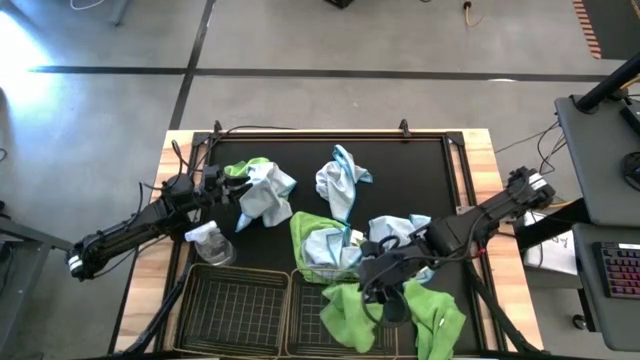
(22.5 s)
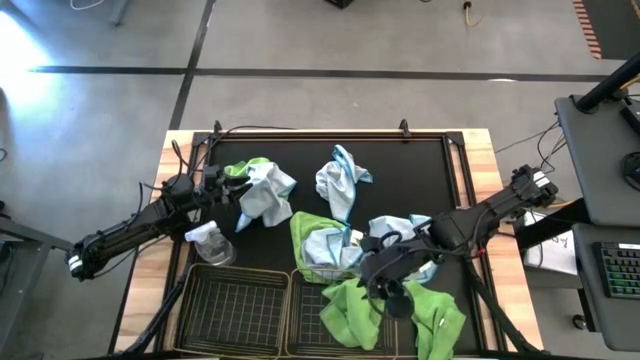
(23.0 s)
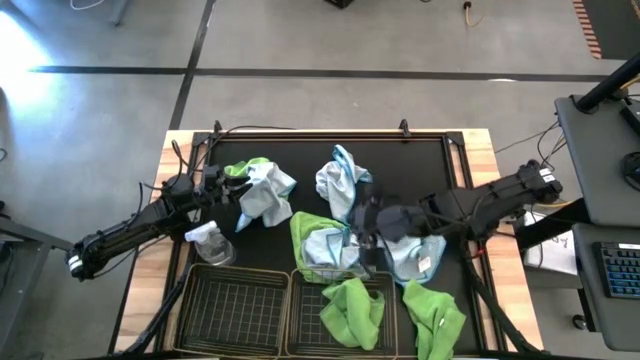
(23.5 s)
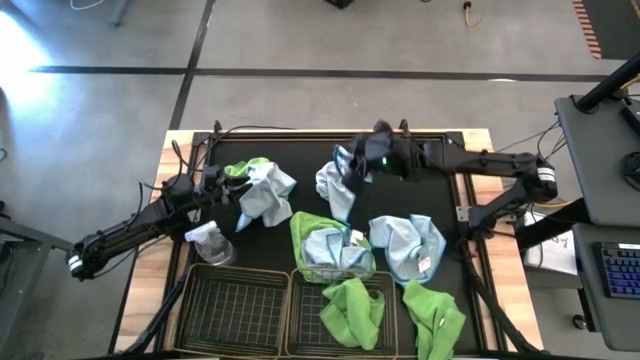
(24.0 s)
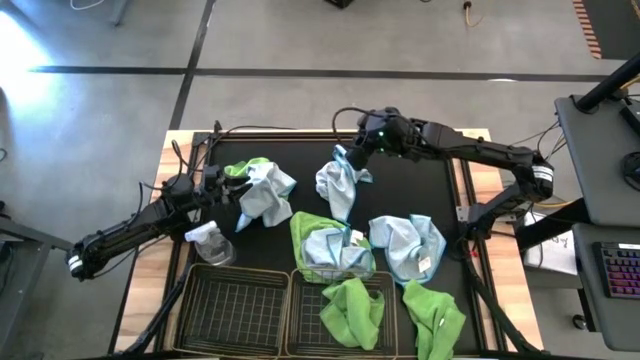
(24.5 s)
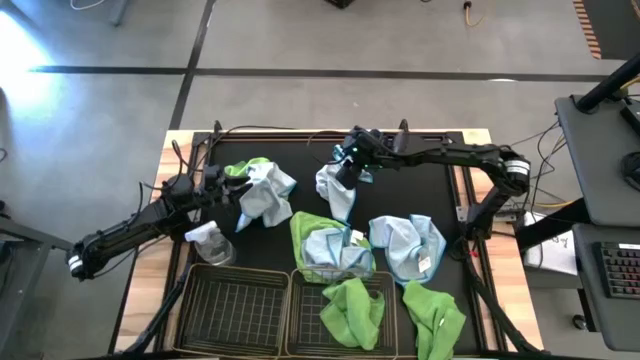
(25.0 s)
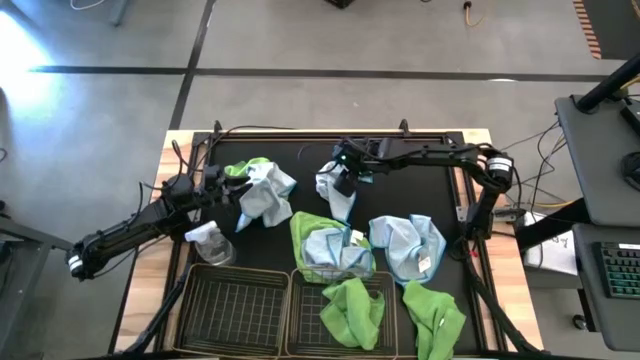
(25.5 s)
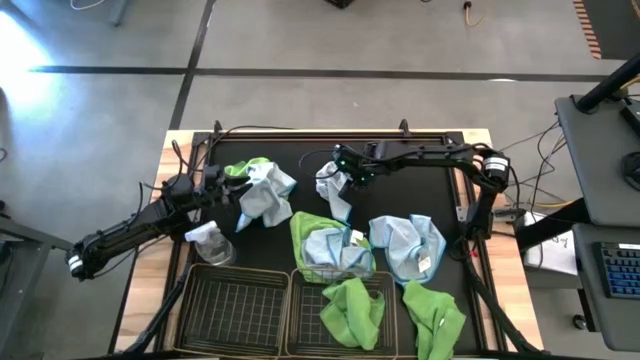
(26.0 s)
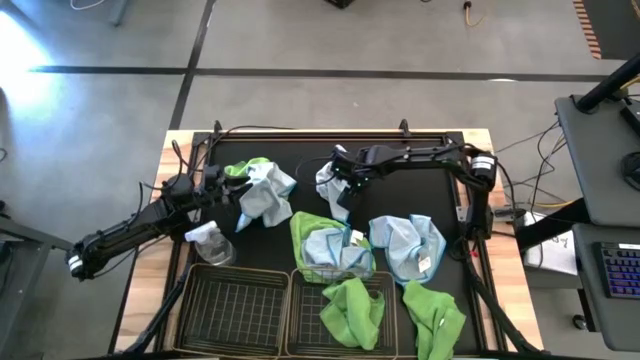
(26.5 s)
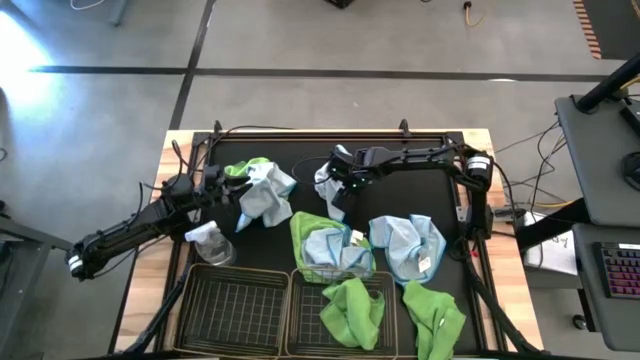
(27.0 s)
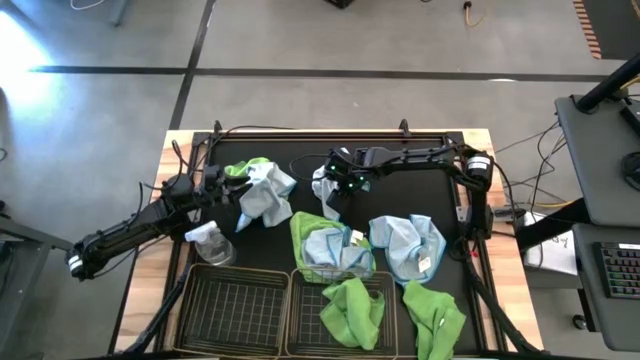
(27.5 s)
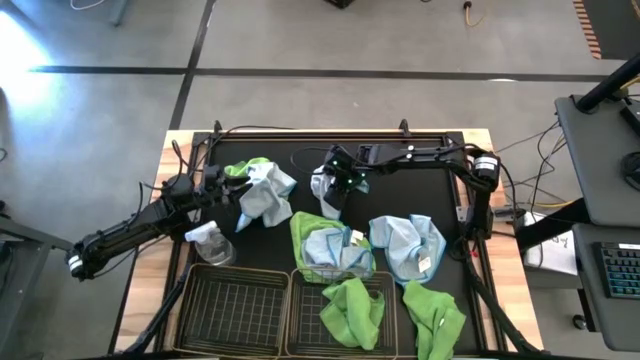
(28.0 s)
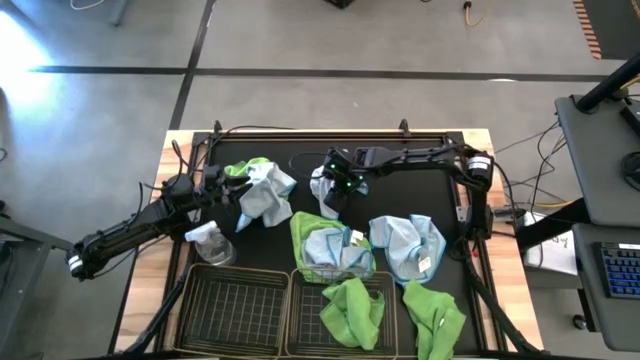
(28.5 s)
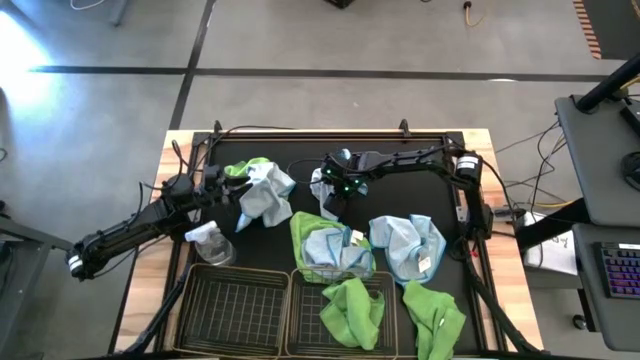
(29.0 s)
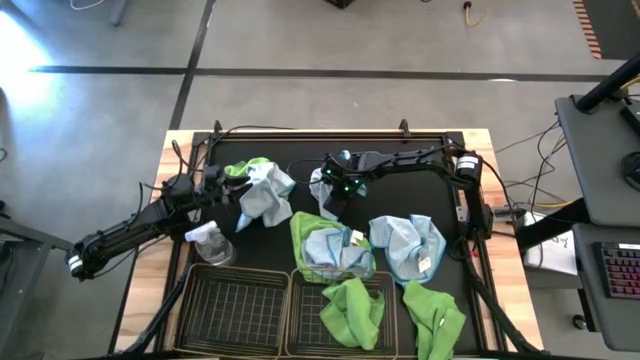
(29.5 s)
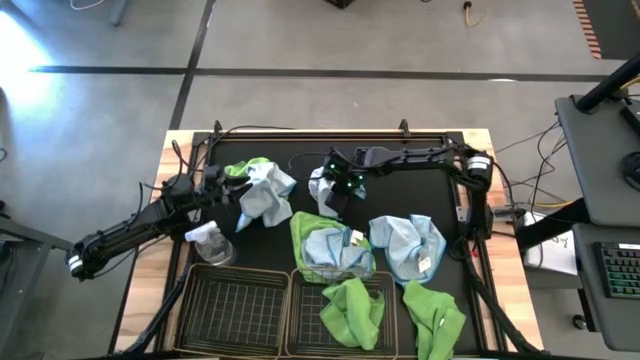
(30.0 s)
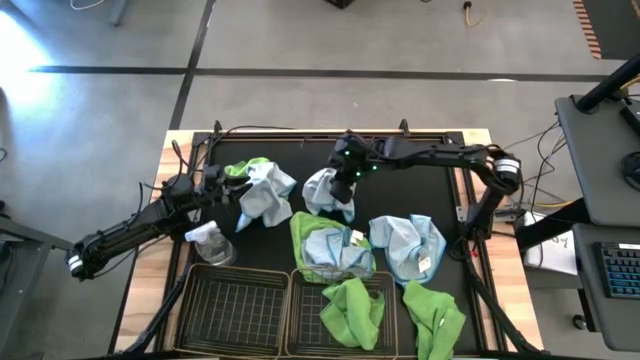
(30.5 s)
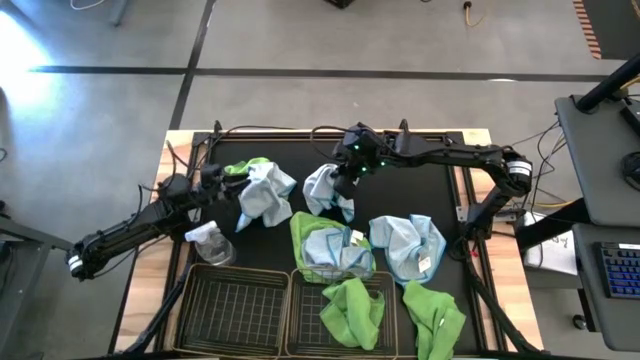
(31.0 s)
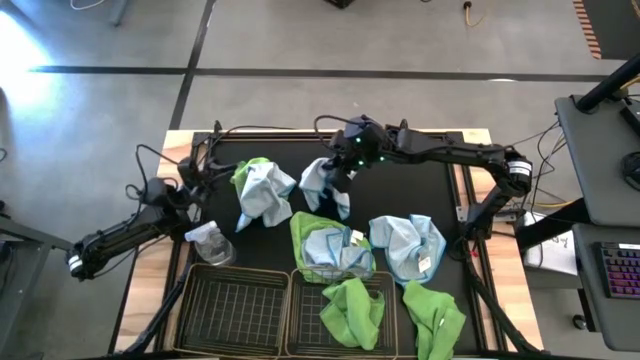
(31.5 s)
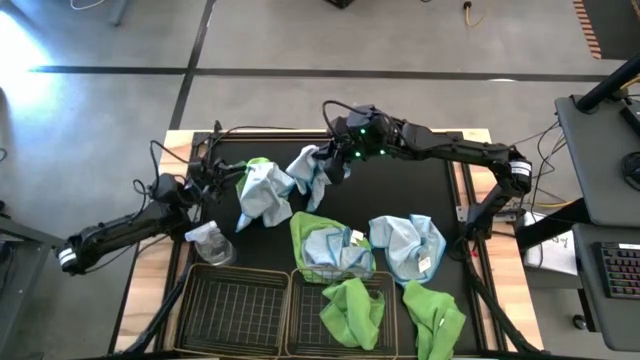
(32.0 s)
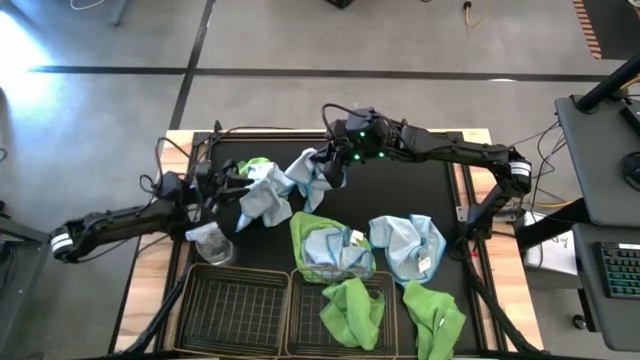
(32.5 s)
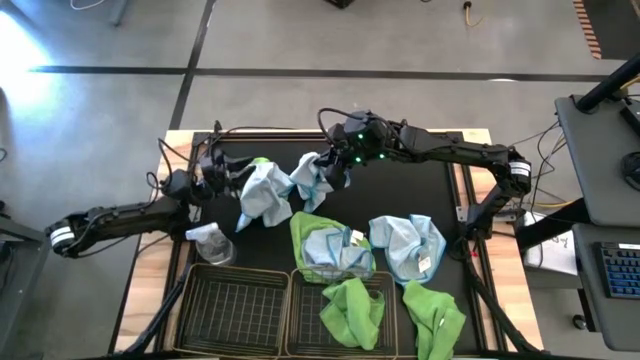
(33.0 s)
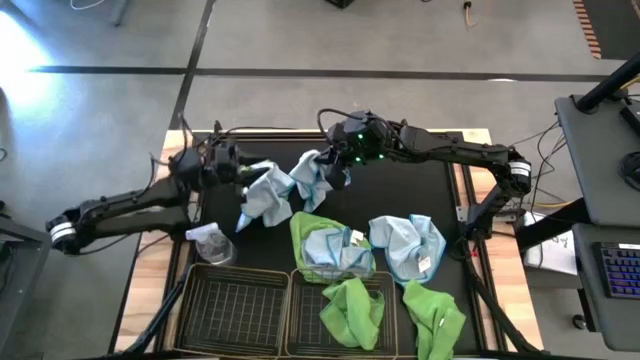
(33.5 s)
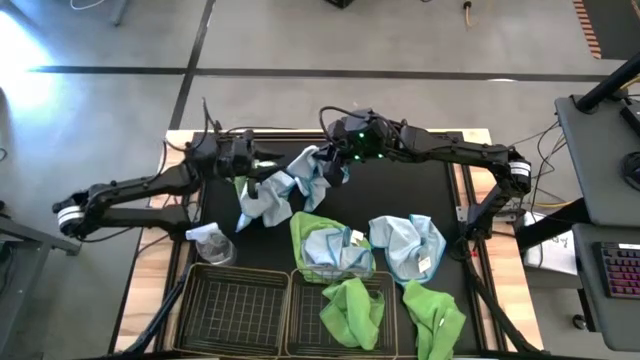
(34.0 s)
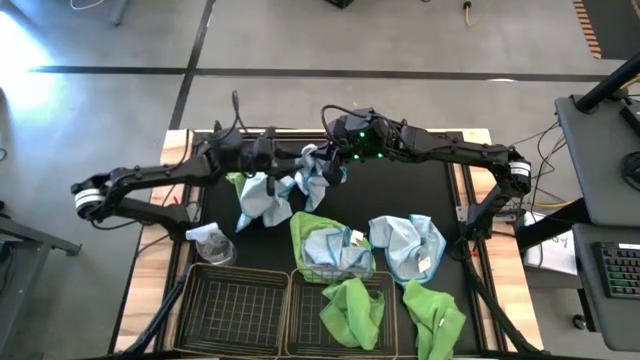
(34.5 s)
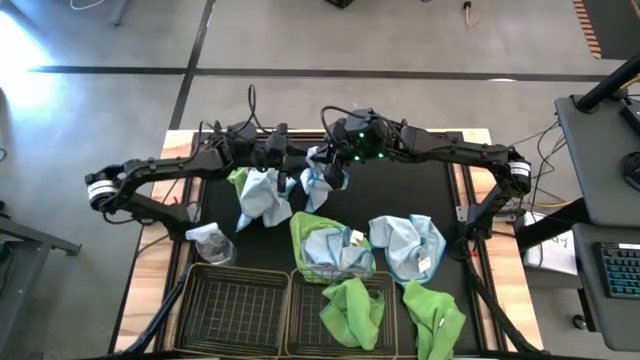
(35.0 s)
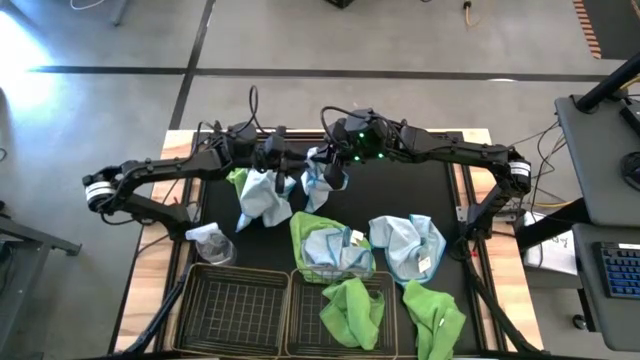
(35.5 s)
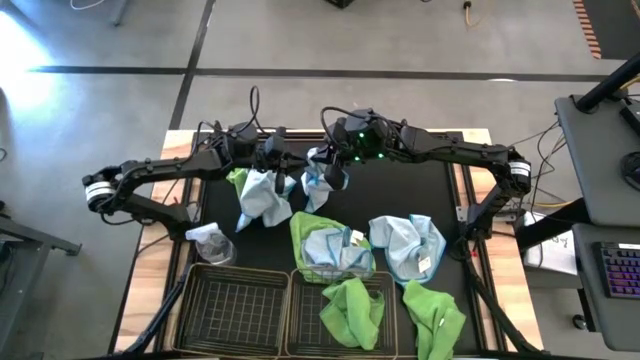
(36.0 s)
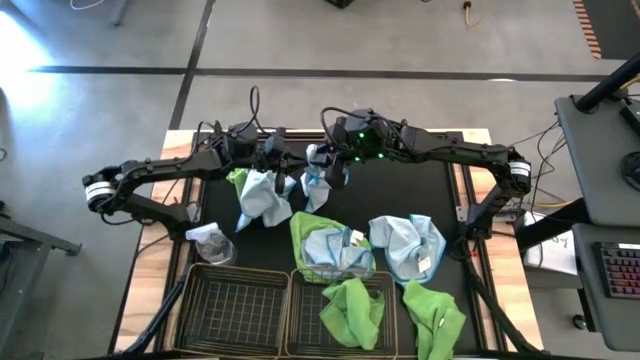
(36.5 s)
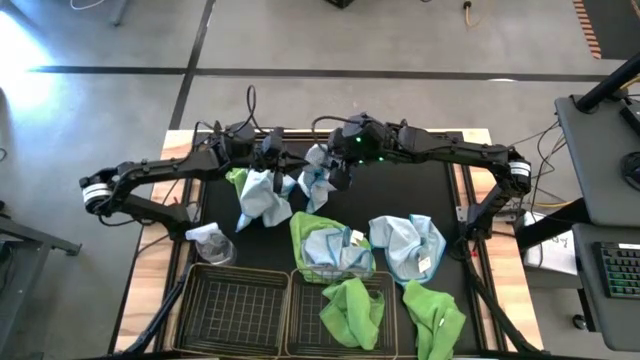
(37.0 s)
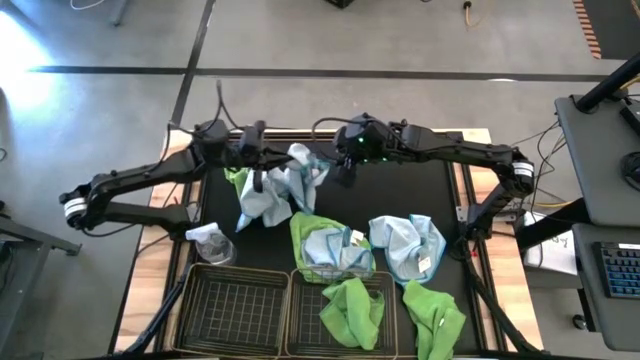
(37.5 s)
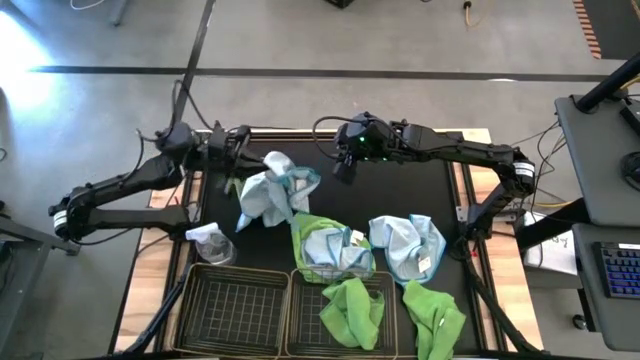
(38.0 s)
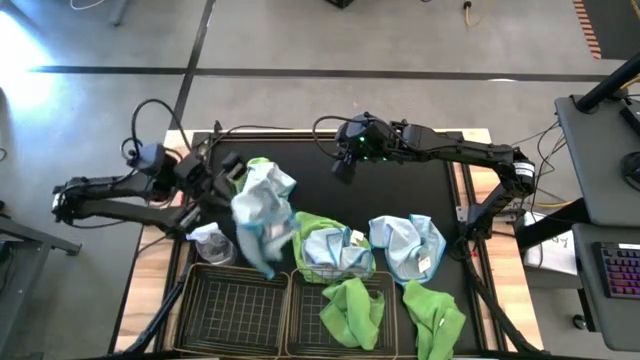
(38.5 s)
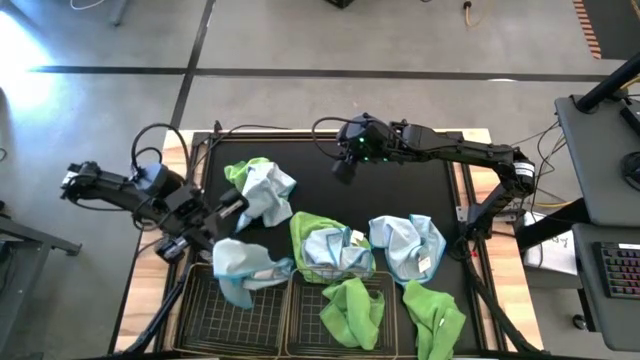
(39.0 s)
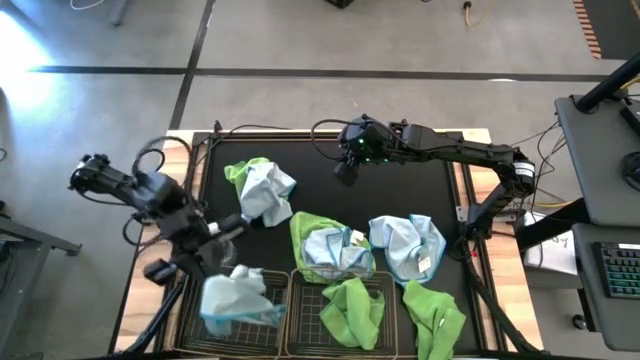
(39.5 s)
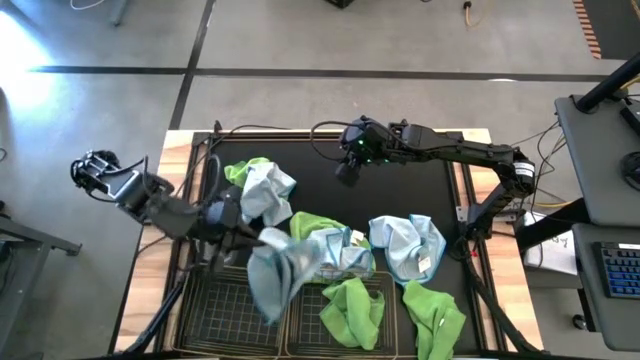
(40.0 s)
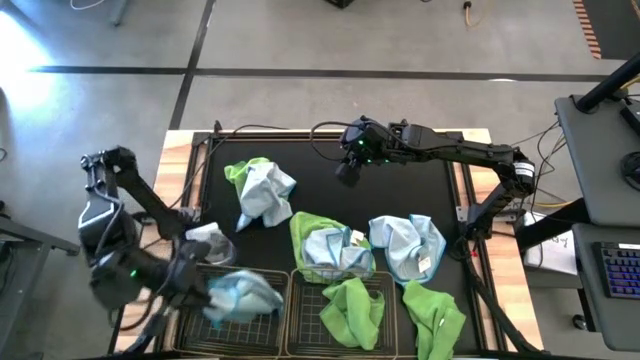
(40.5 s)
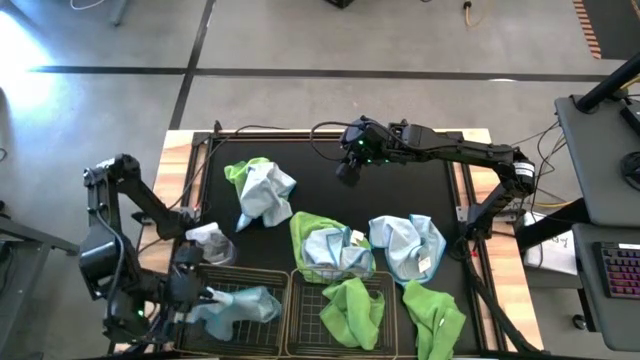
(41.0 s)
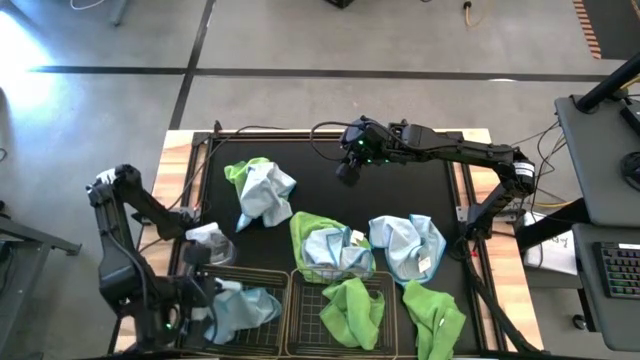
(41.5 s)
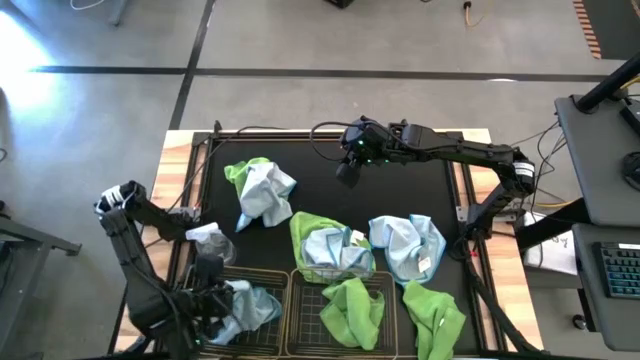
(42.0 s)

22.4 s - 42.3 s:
Task: Sort microfiber towel by color & place in baskets
Put the top right blue towel into the left wire basket

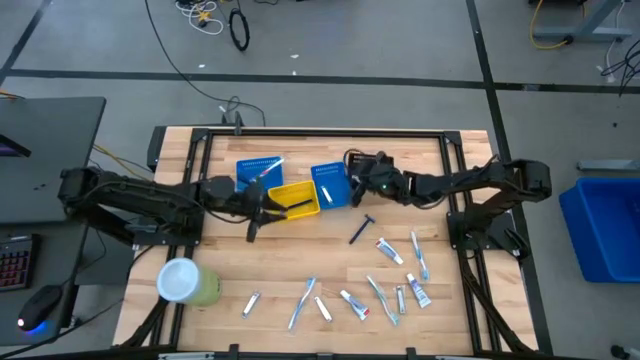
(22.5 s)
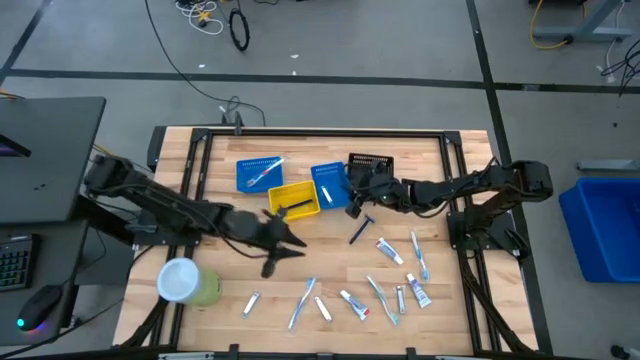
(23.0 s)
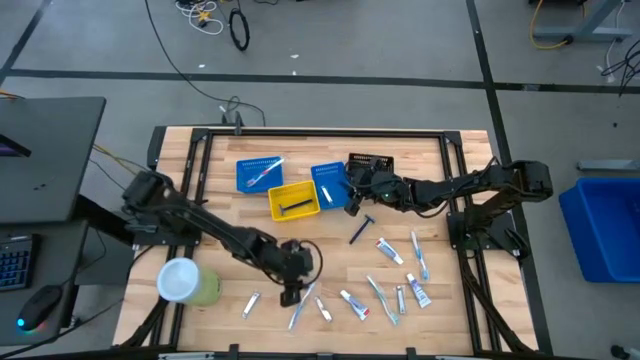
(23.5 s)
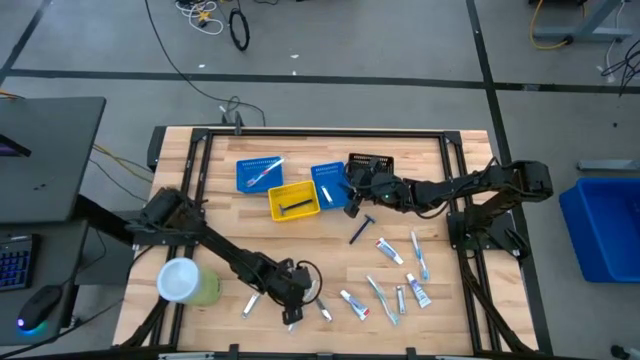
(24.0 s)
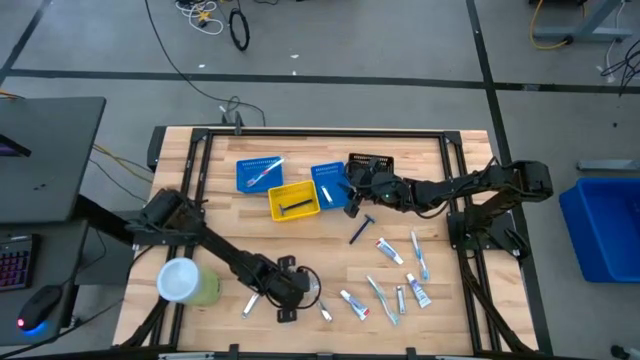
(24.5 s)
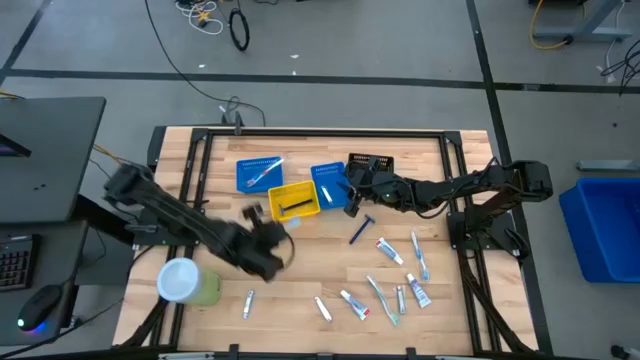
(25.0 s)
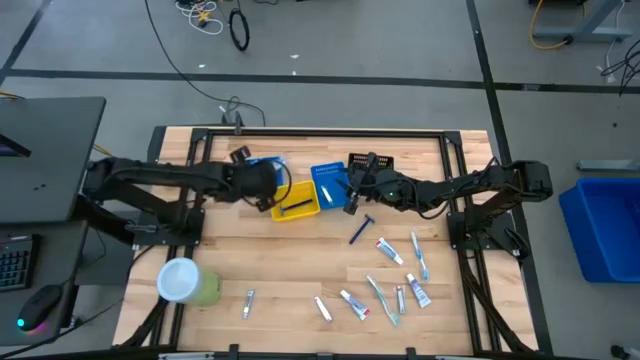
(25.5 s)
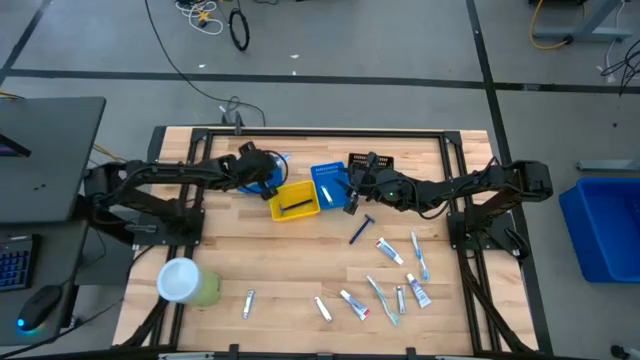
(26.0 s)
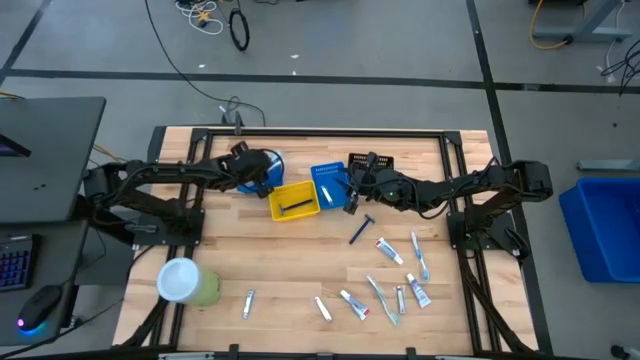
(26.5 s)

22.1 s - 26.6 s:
Task: Pick & Place Travel size toiletries
Put the blue toothbrush into the left blue bin
